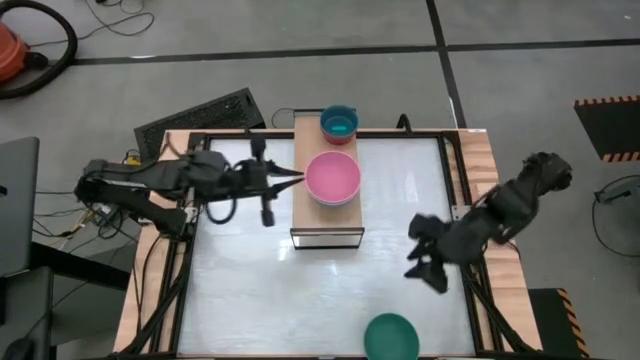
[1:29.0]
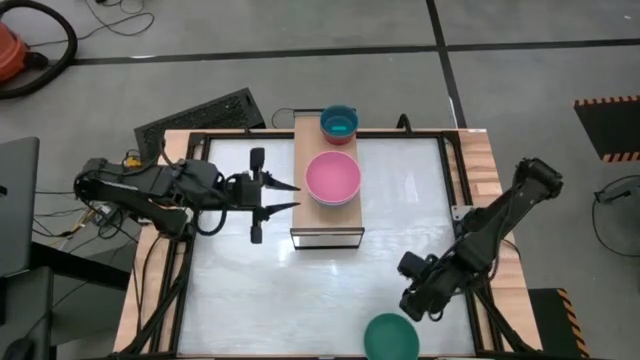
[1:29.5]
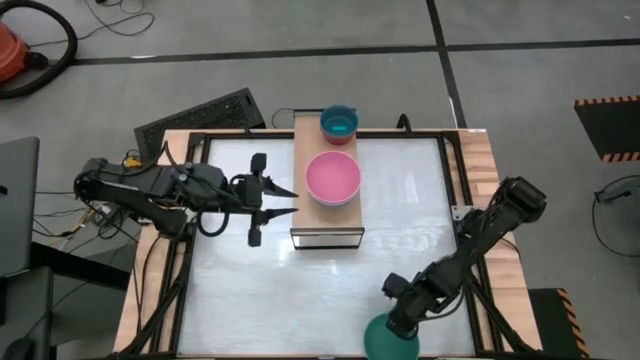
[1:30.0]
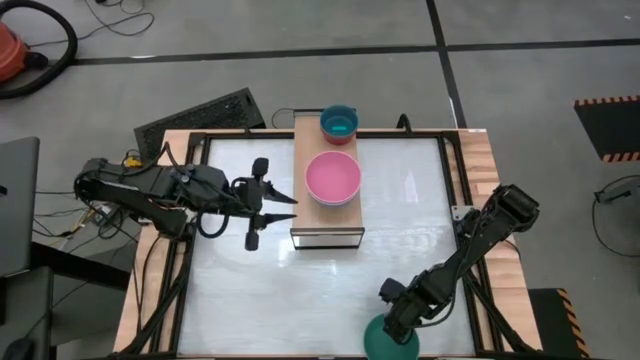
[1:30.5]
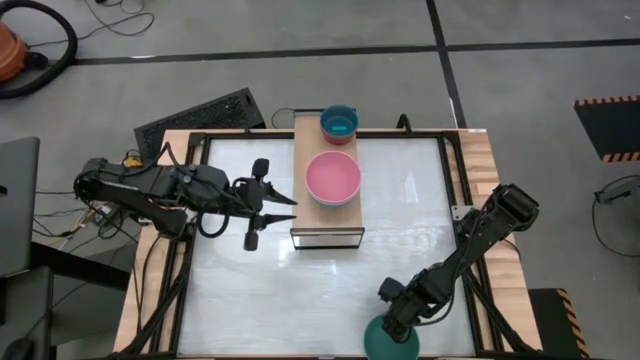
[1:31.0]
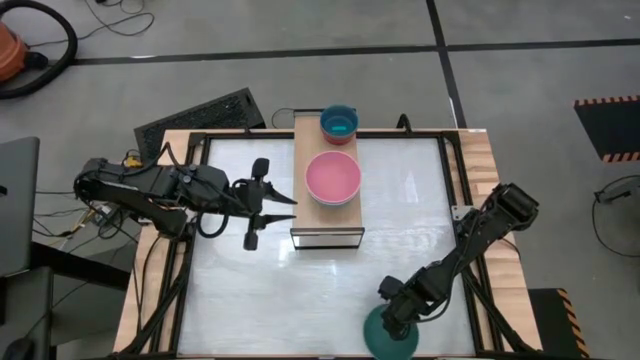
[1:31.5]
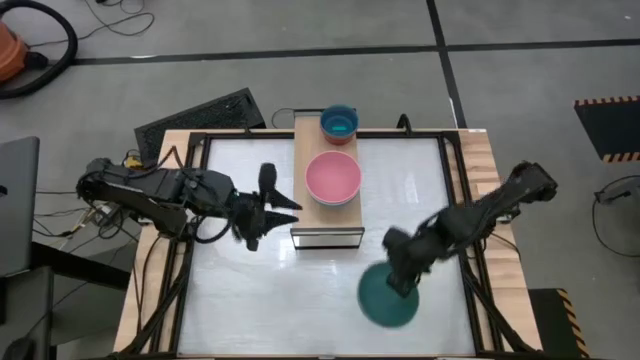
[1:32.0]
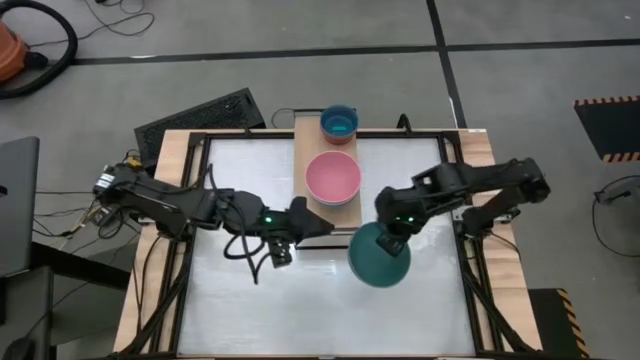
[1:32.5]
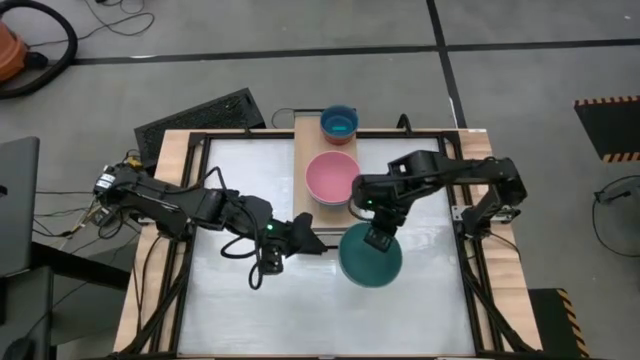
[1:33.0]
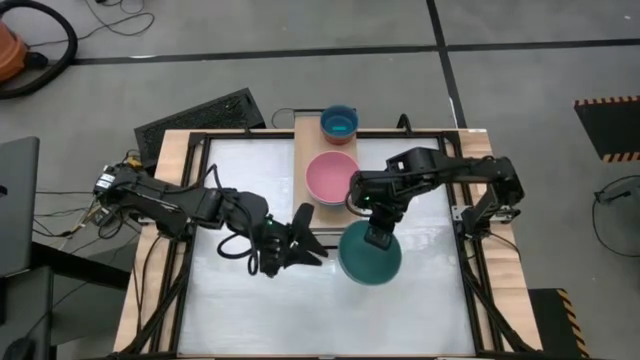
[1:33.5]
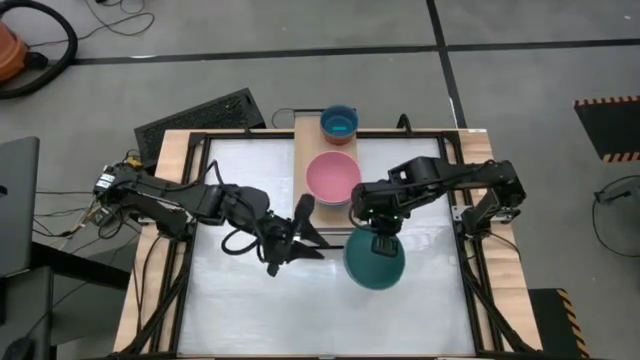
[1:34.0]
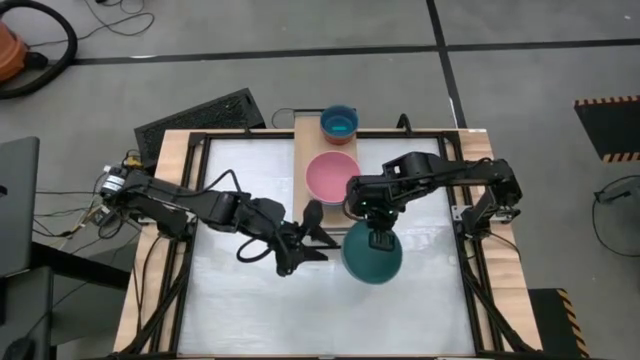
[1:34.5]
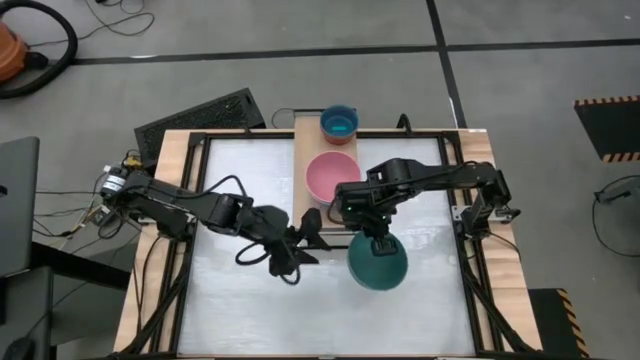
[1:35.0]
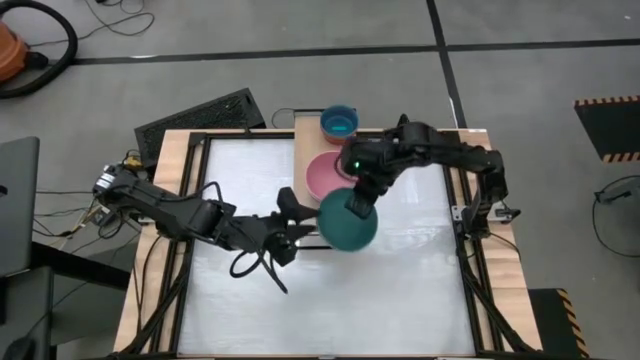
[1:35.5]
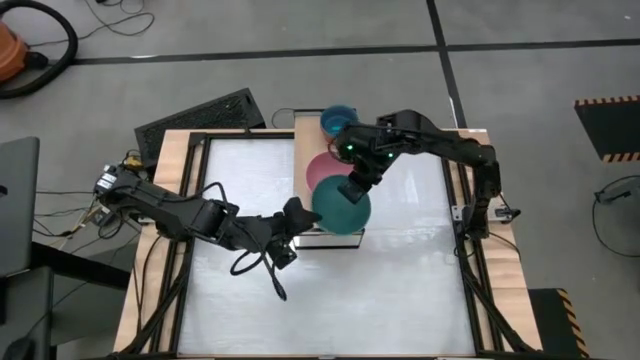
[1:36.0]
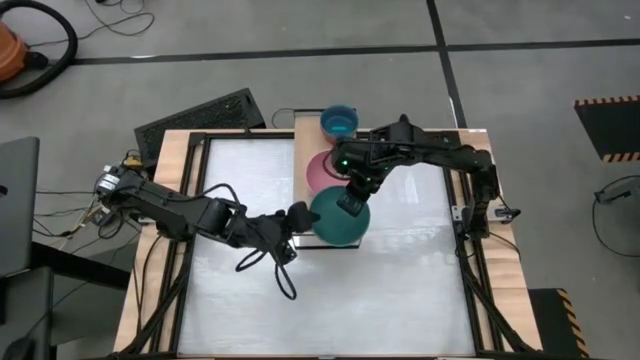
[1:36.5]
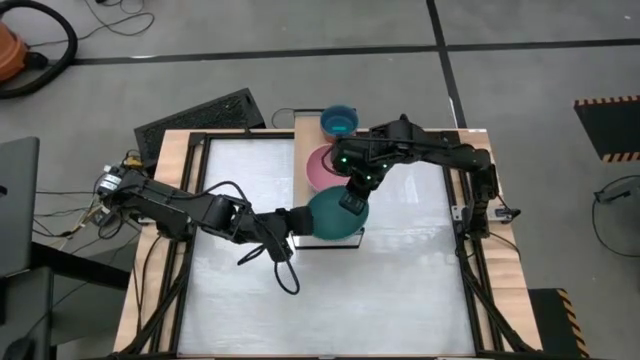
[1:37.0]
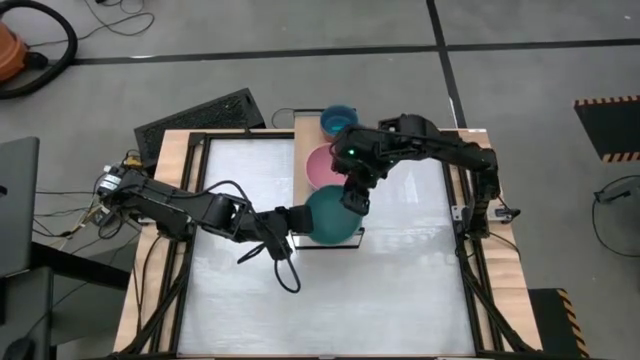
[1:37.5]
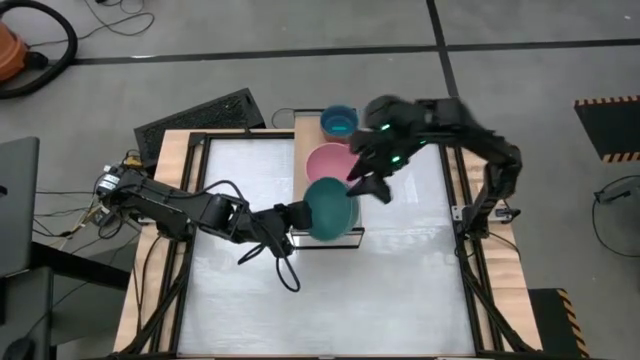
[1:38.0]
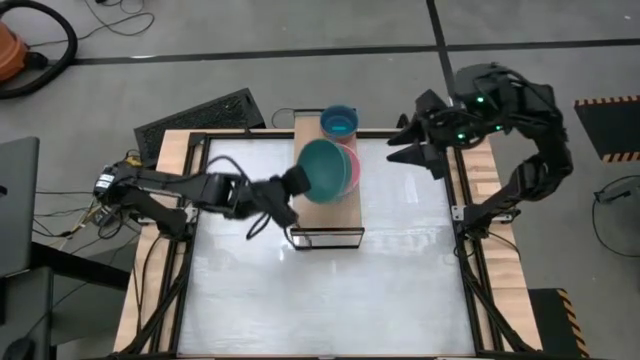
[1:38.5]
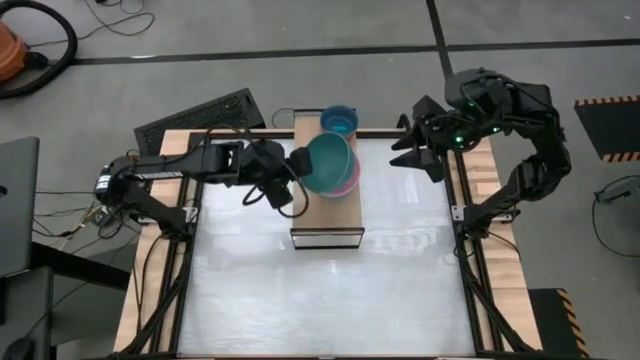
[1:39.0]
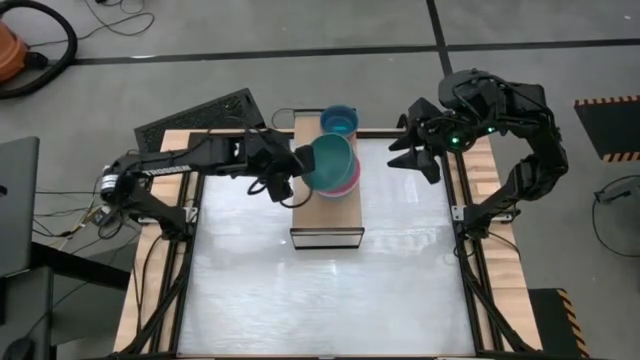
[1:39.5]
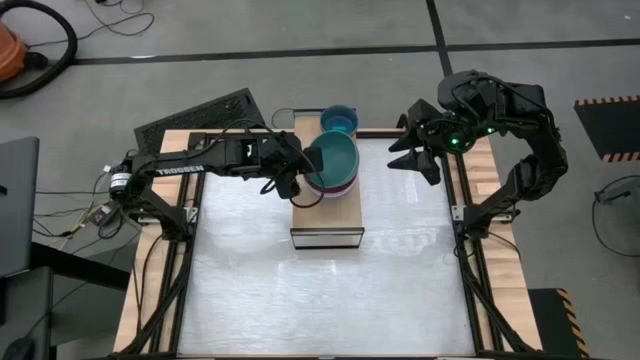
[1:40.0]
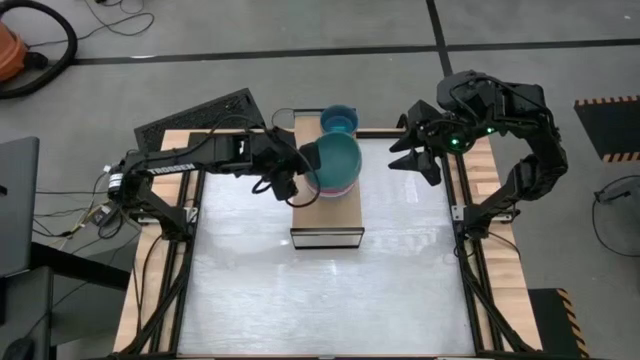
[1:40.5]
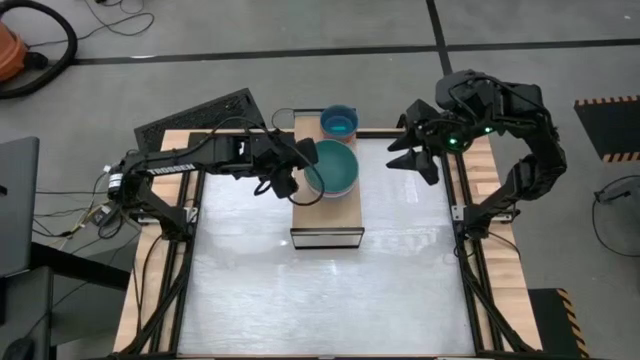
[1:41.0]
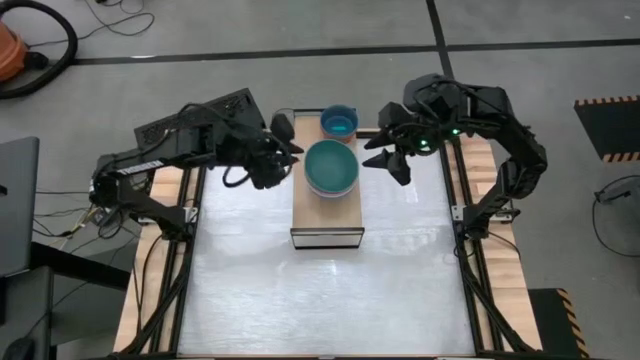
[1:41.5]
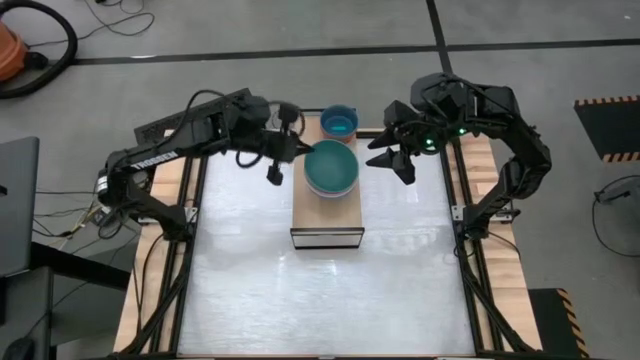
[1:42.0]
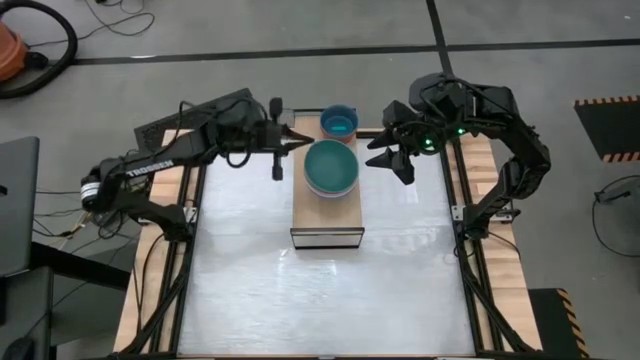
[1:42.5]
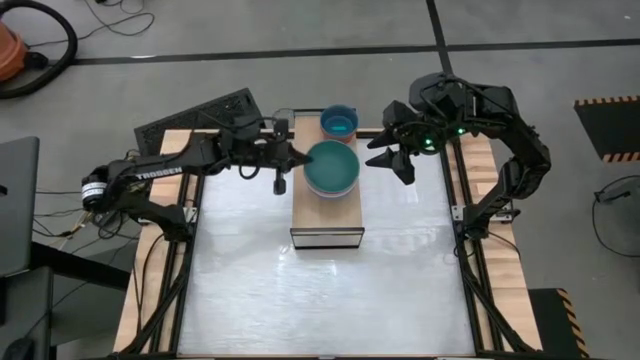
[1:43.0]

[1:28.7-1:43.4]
Task: Place and stack bowls onto a shelf
Stack the dark green bowl on top of the light pink bowl on the shelf

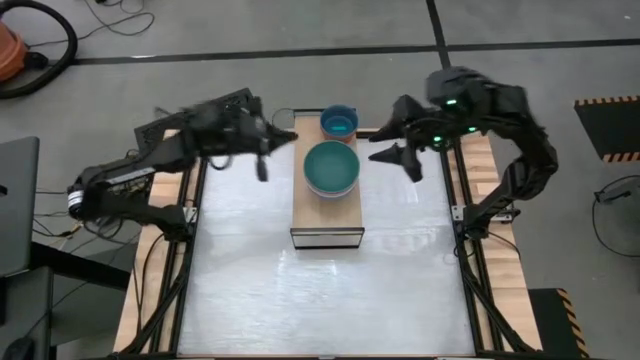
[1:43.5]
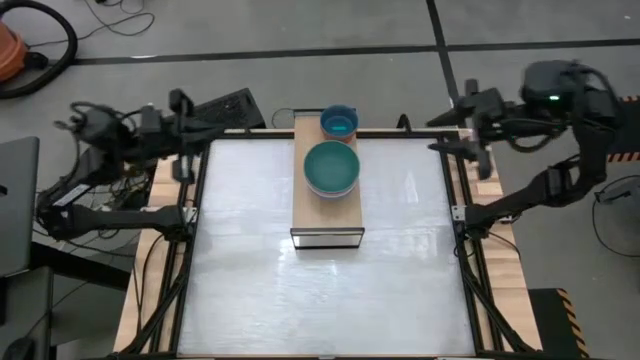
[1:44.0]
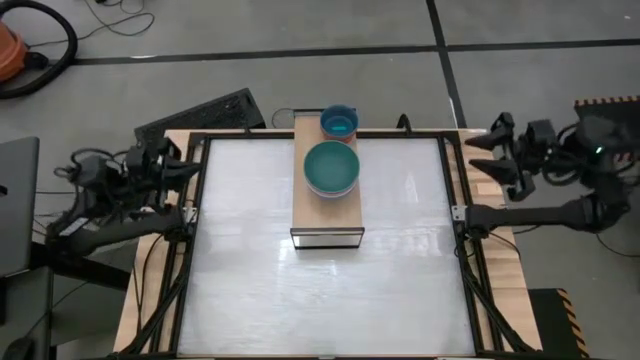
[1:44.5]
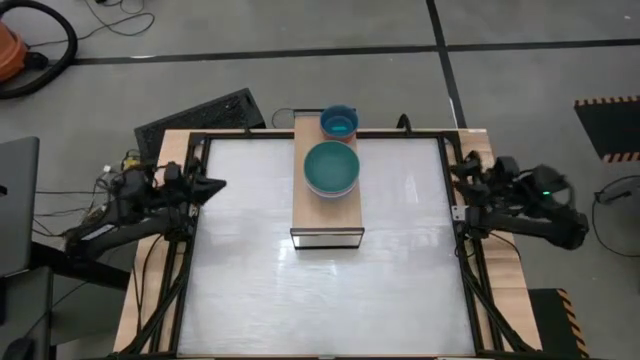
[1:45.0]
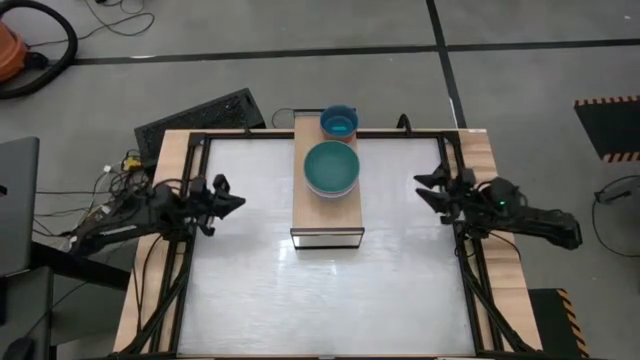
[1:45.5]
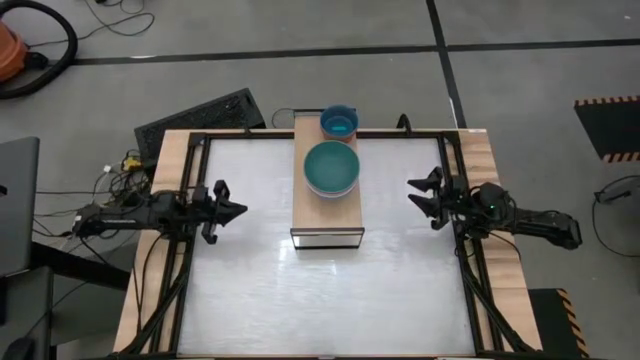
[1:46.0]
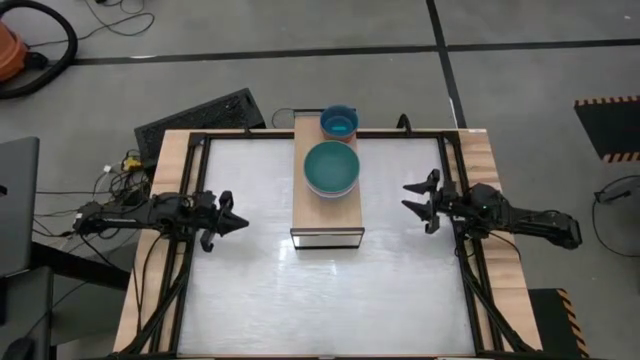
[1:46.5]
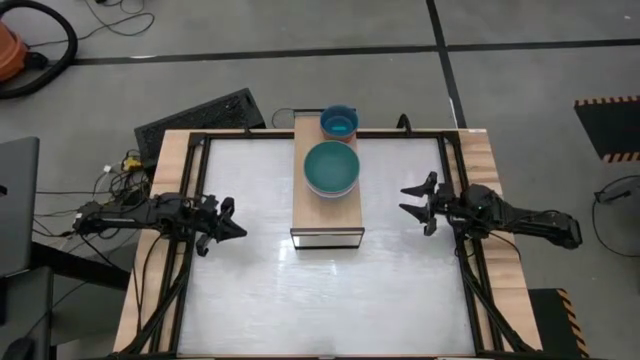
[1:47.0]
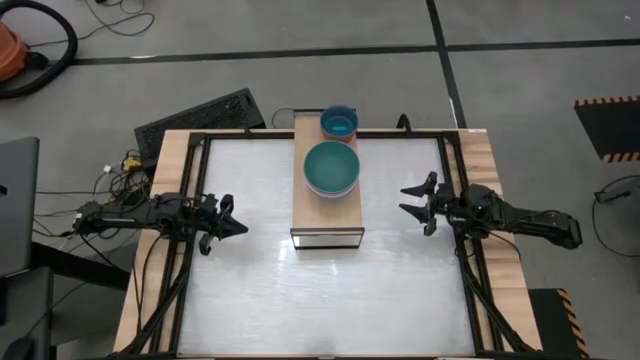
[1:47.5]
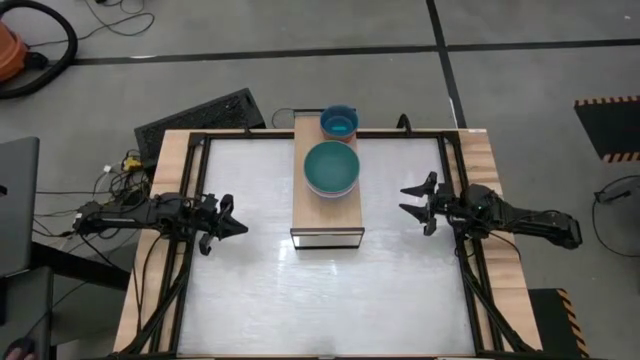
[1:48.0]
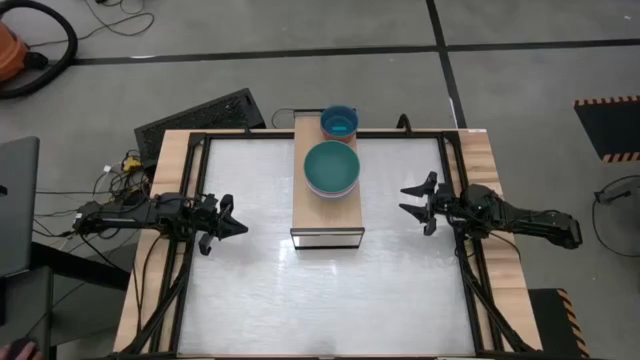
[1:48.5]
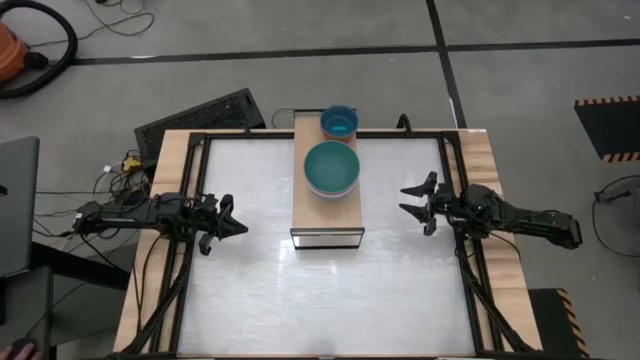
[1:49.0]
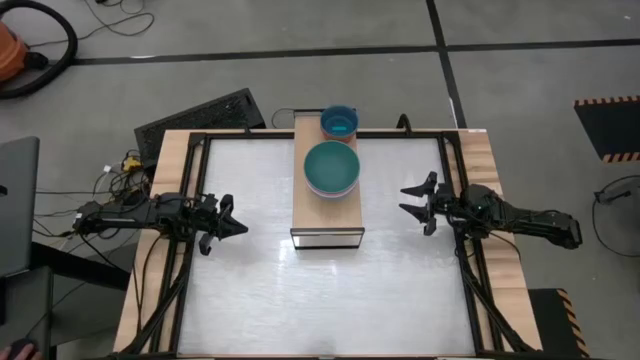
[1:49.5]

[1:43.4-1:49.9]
Return to Home Position

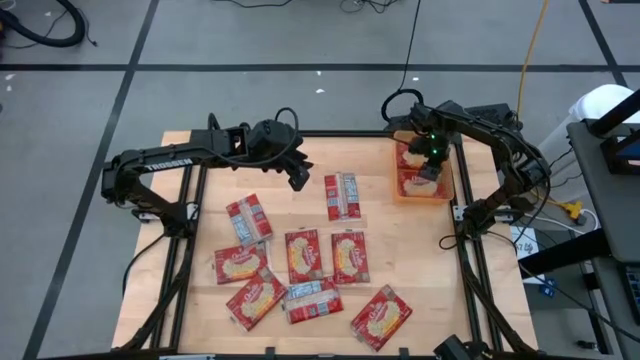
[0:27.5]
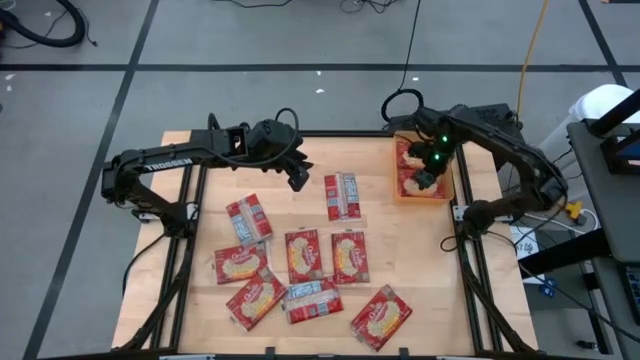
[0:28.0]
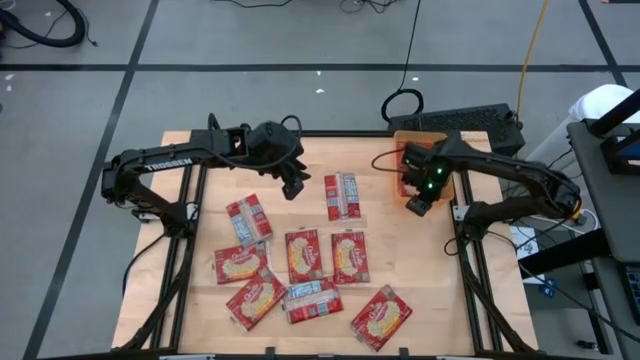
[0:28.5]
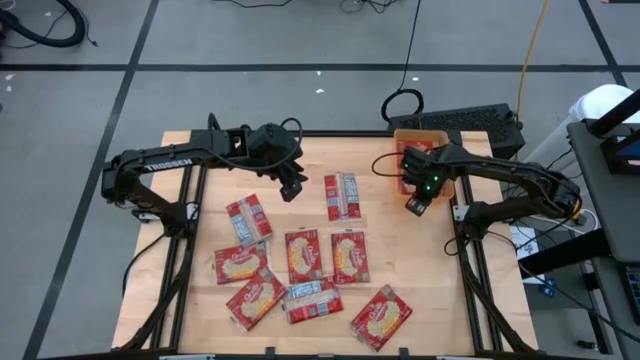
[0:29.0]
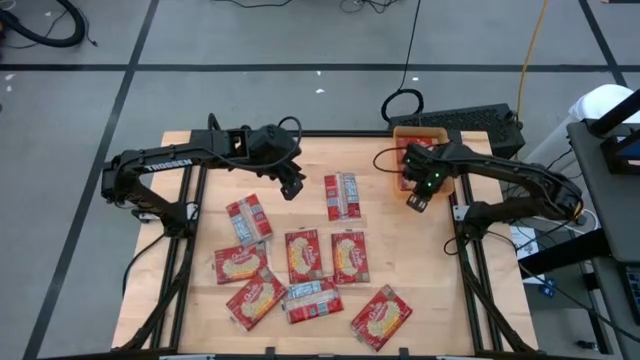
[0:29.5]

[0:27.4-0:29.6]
Task: Sort popcorn bags into baskets
Adjust the orange bin
